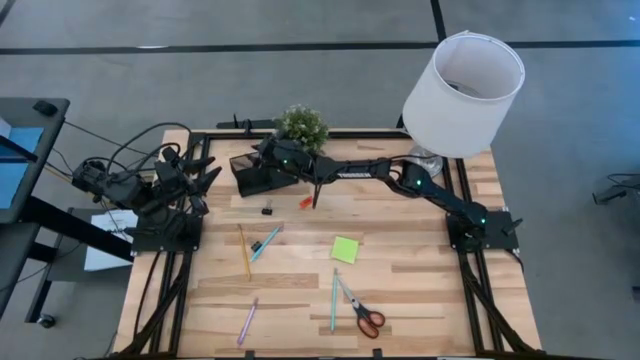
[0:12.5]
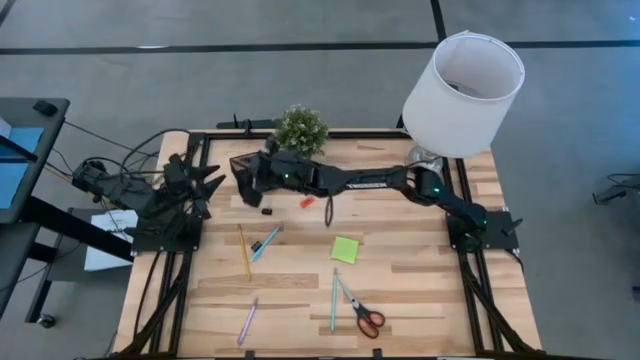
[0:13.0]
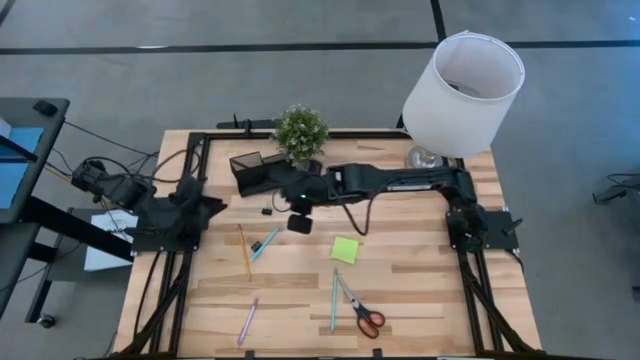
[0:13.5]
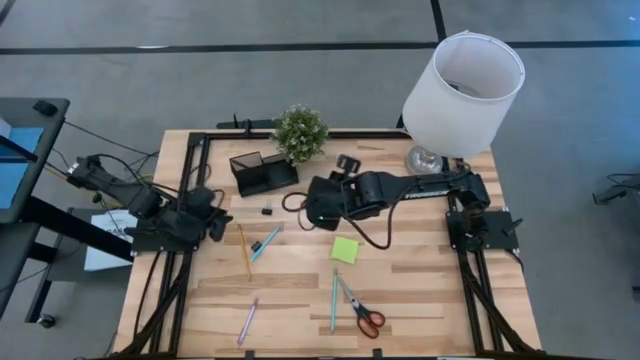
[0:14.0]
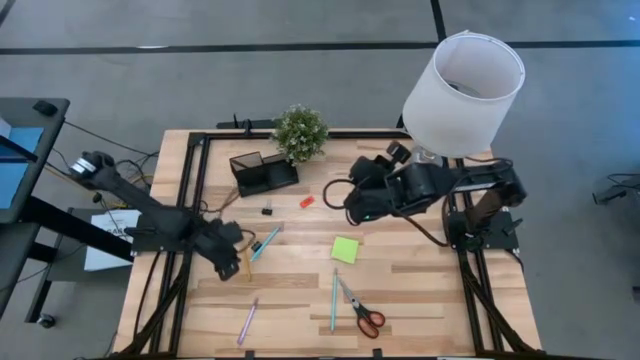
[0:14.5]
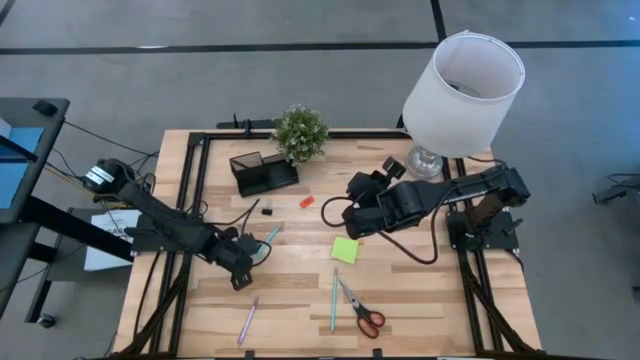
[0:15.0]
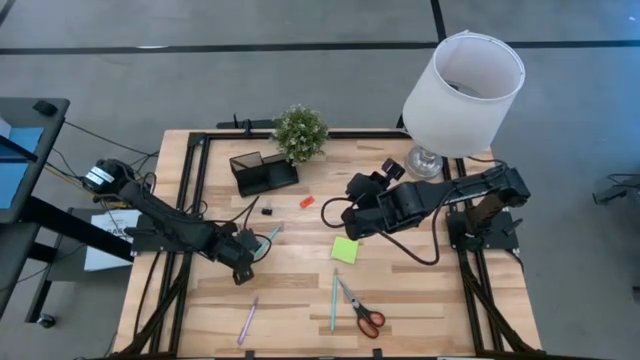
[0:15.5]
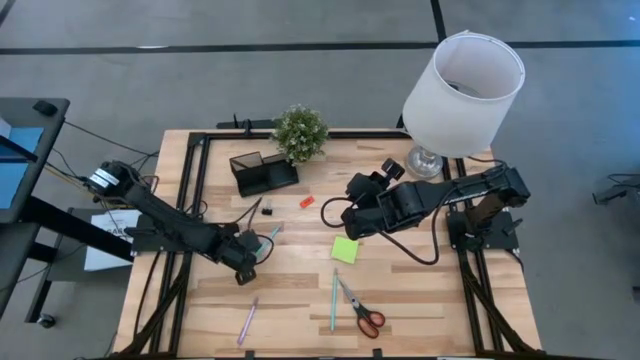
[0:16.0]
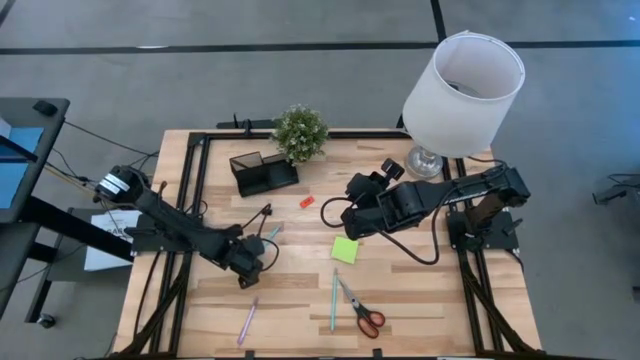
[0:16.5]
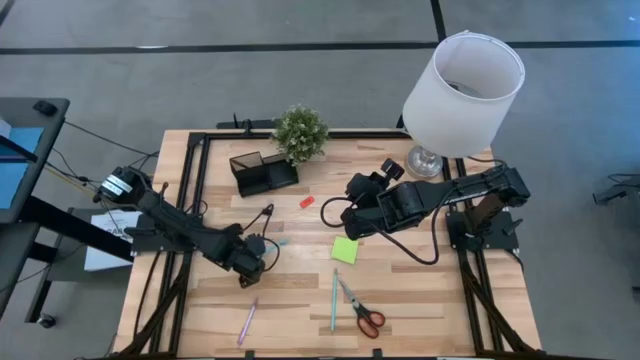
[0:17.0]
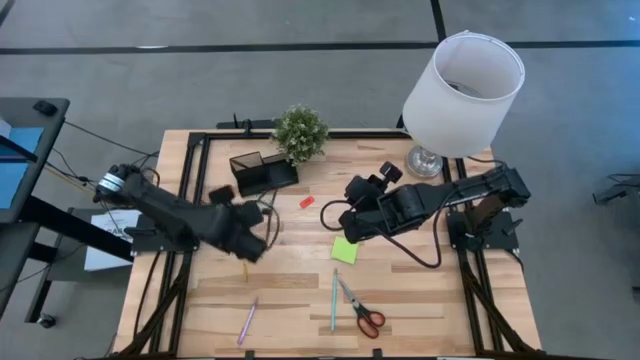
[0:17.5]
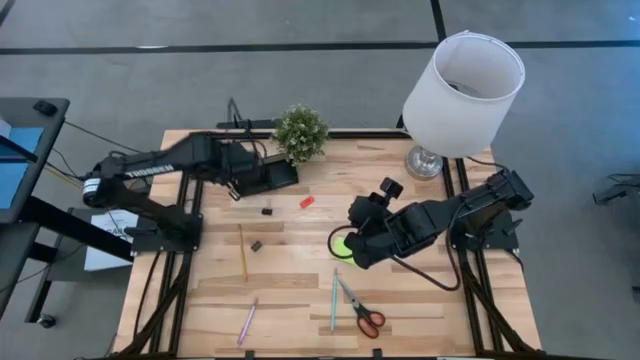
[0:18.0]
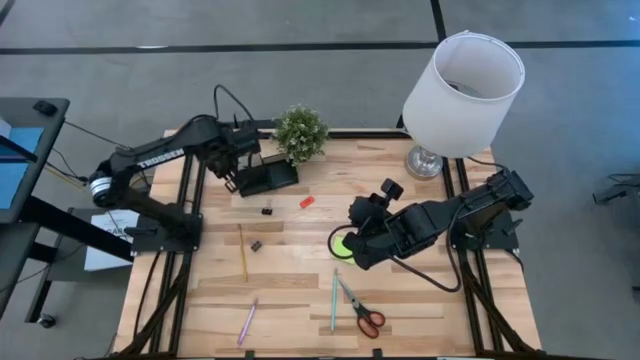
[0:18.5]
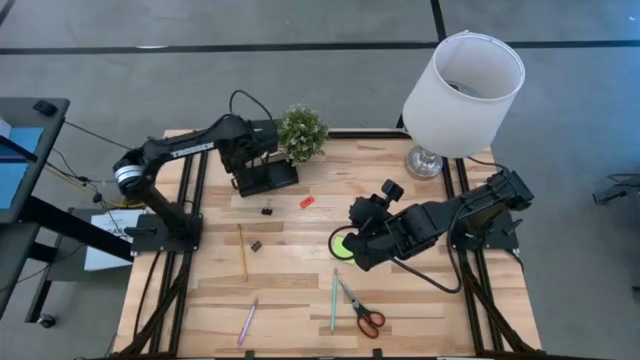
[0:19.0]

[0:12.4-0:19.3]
Task: Pick and place office supplies into organizer
Put the blue pen into the black organizer

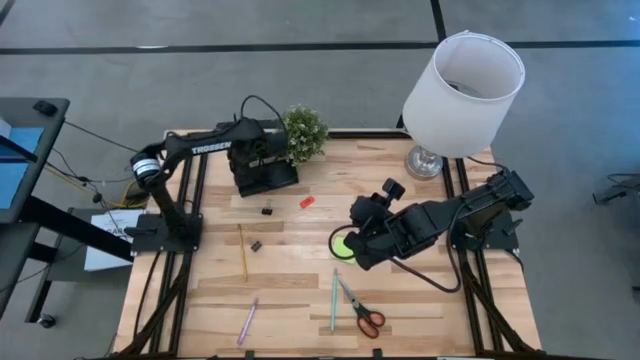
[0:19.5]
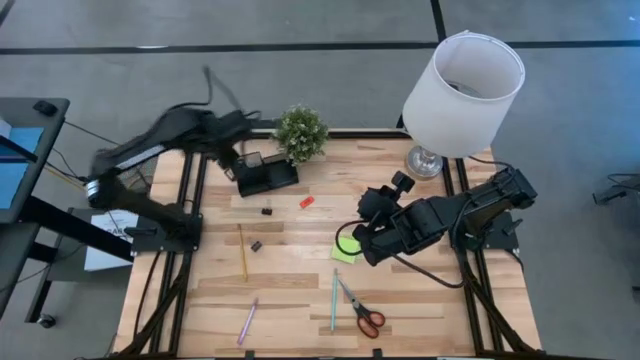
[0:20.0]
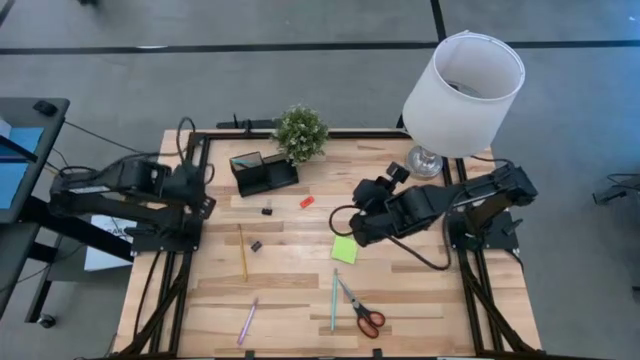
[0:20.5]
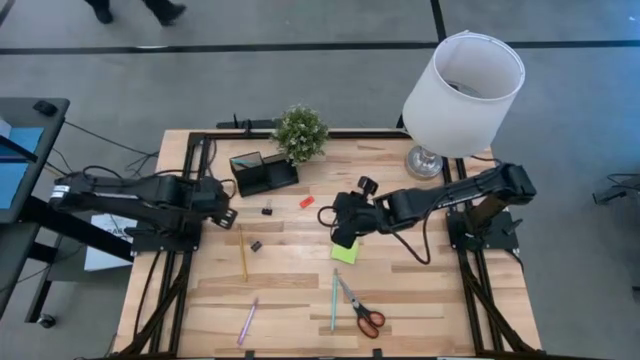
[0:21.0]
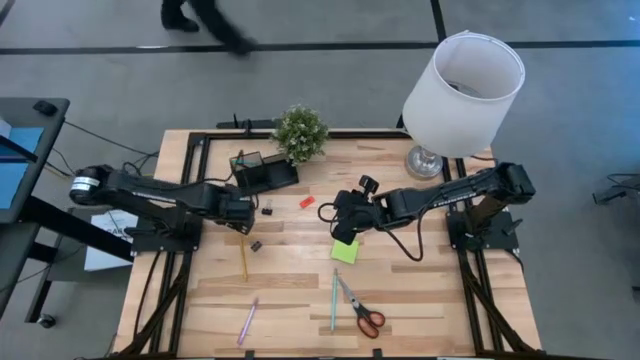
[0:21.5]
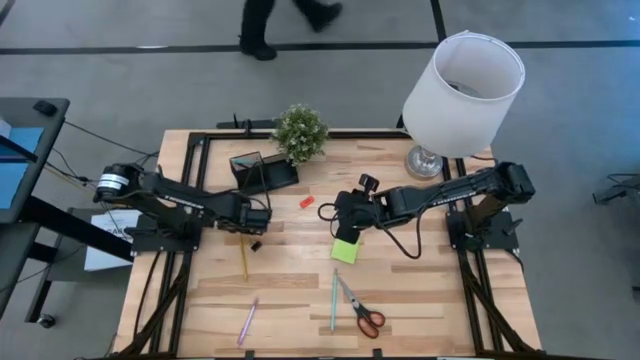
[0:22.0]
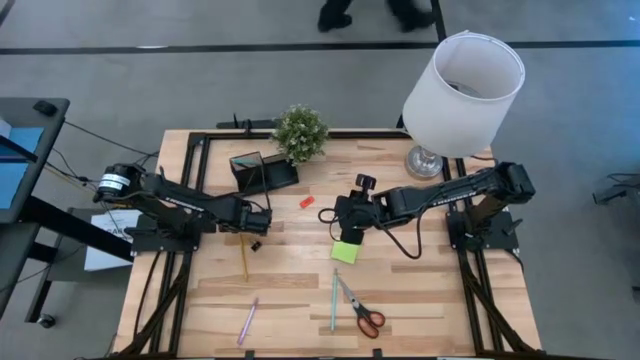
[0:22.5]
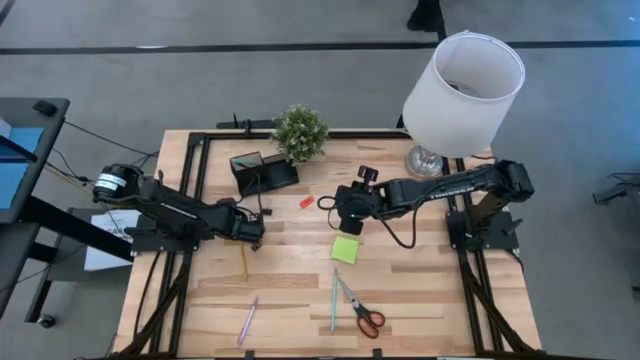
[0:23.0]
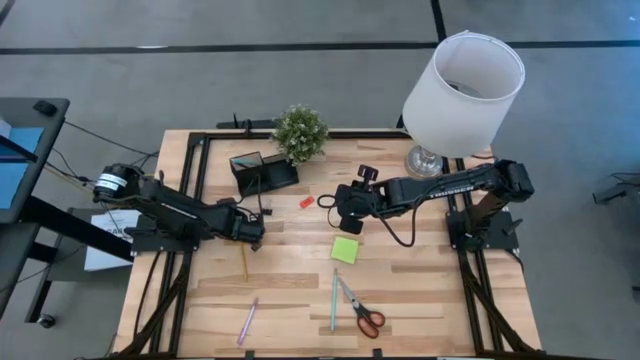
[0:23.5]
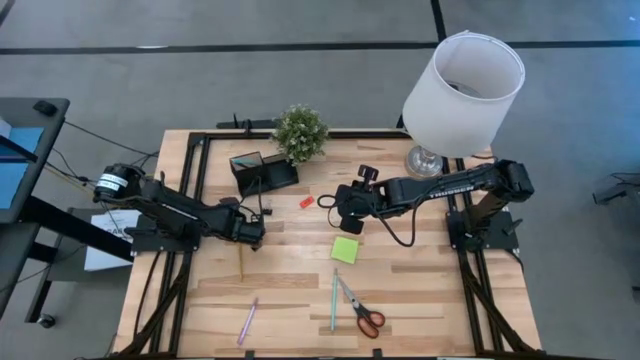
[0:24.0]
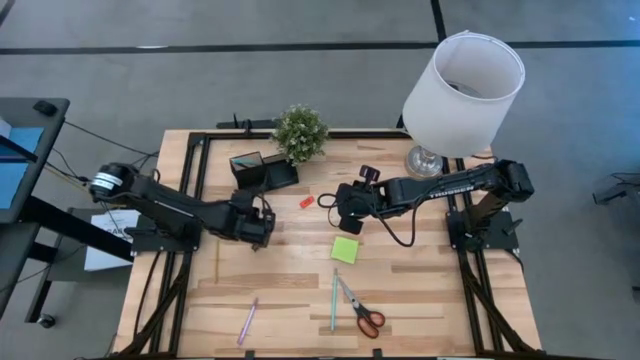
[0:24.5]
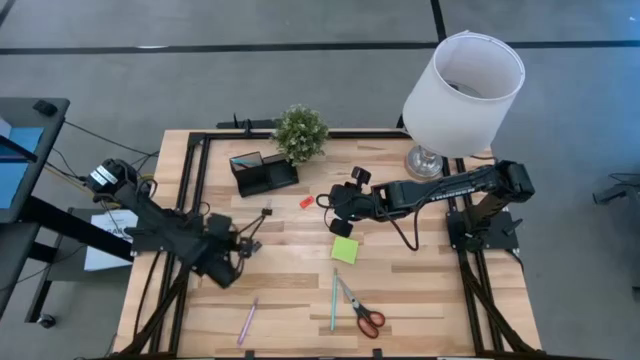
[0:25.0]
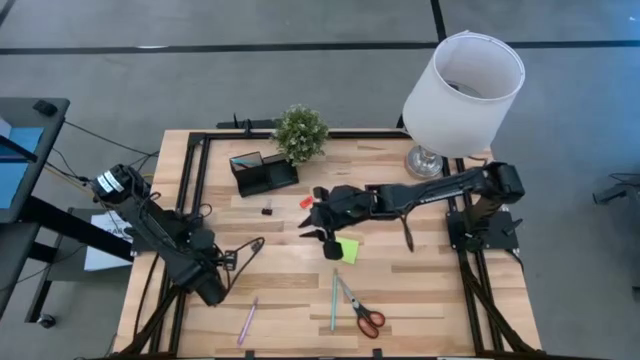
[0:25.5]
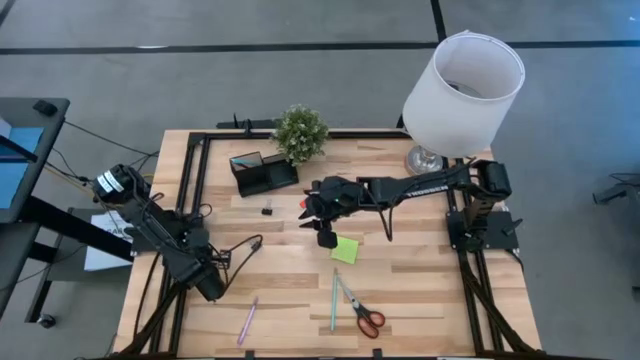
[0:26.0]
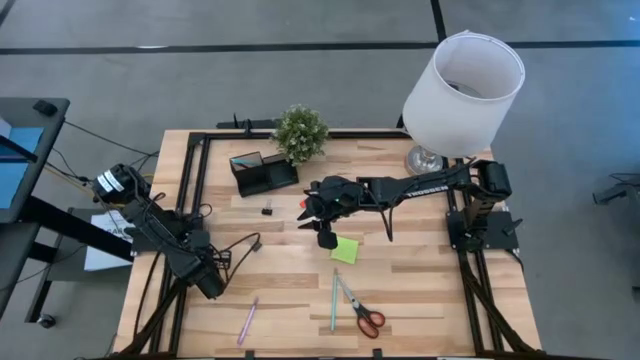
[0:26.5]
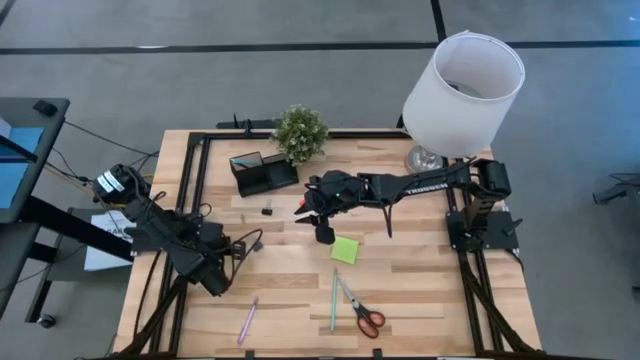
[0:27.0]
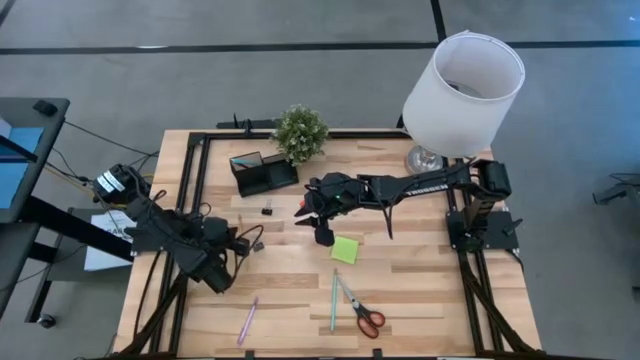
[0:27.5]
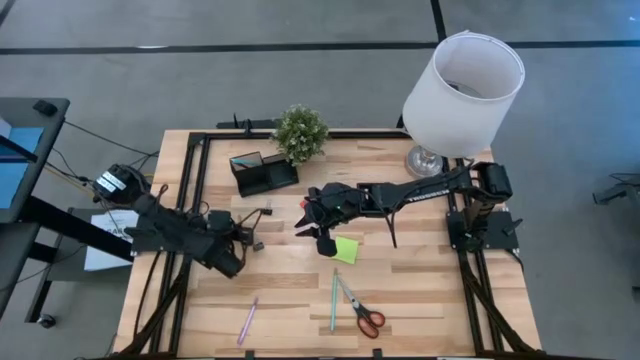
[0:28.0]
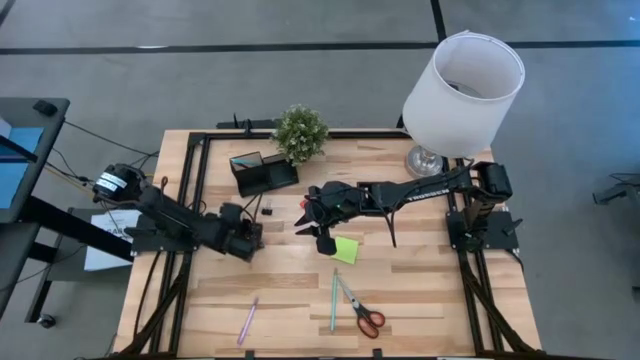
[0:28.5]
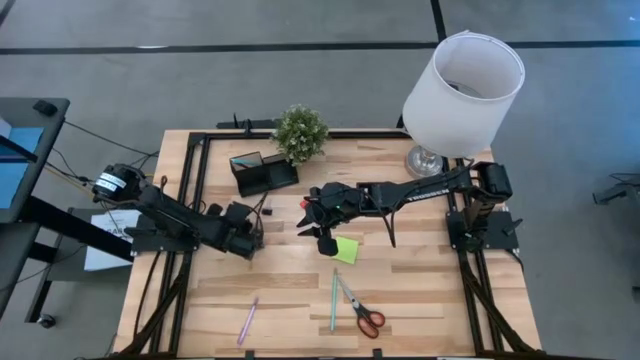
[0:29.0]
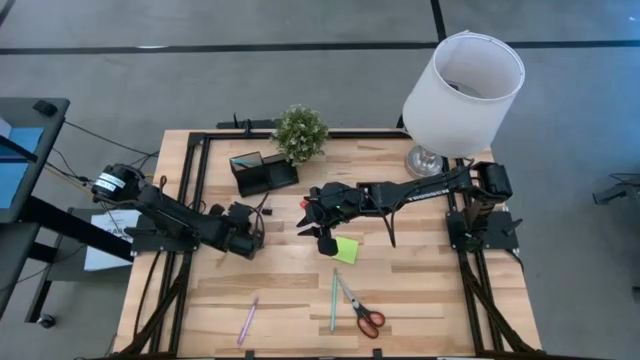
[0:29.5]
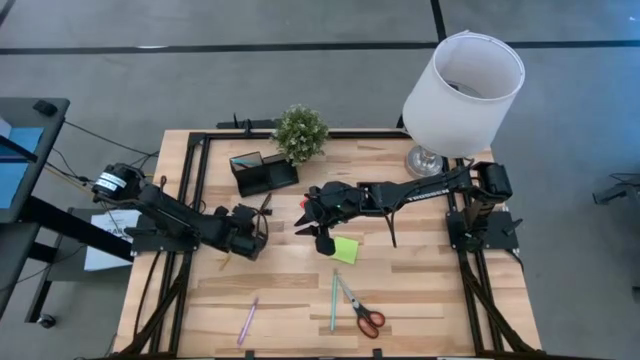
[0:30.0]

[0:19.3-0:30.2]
Put the yellow pencil into the black organizer

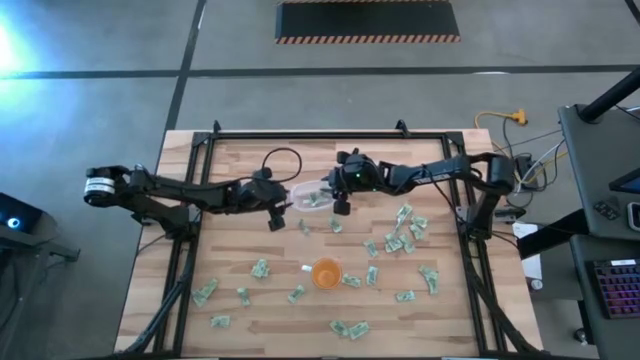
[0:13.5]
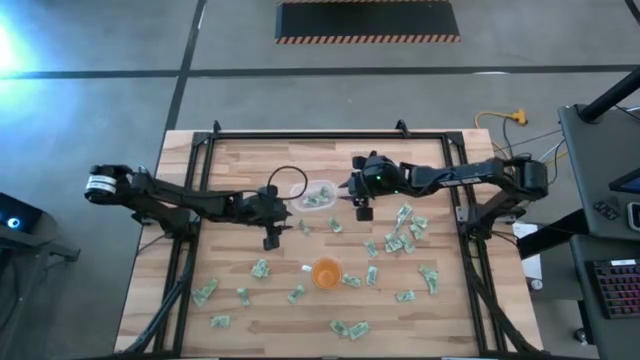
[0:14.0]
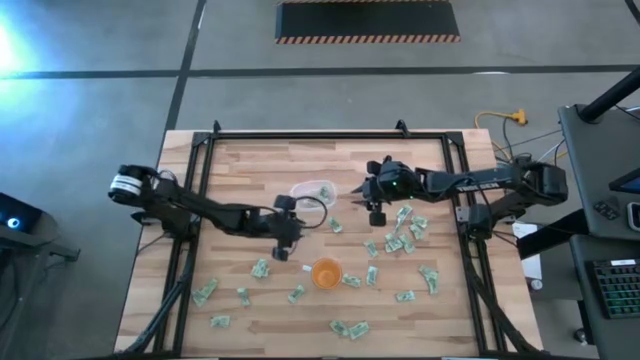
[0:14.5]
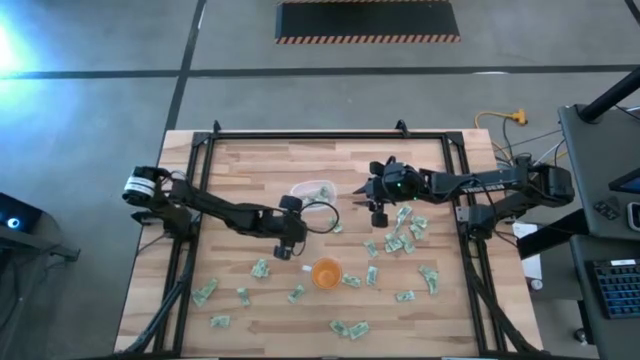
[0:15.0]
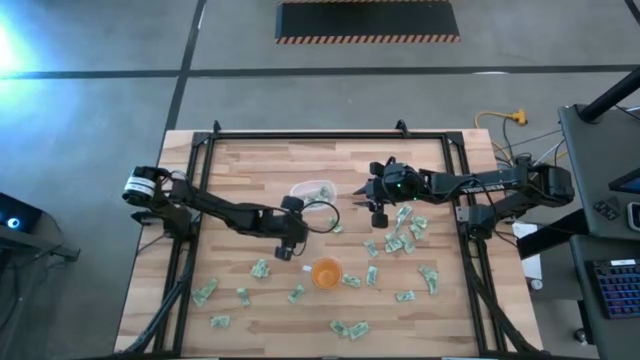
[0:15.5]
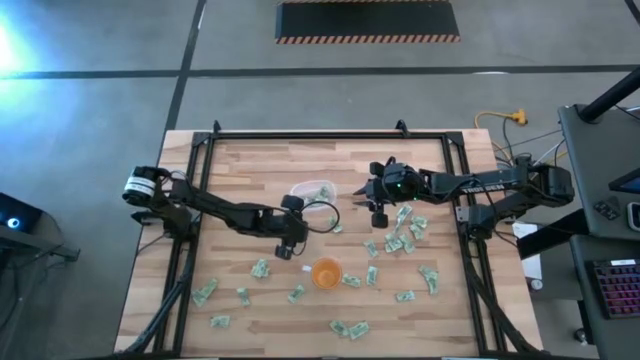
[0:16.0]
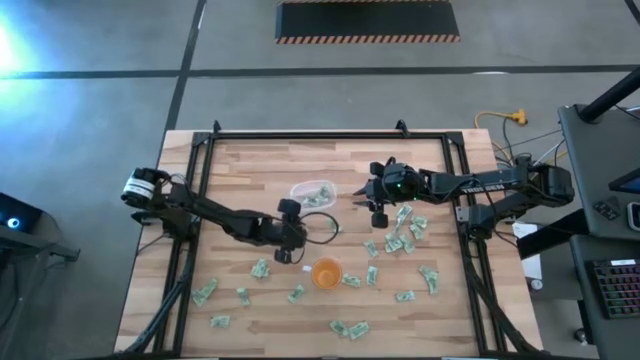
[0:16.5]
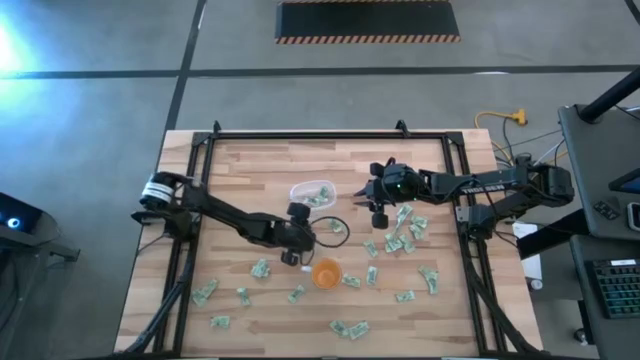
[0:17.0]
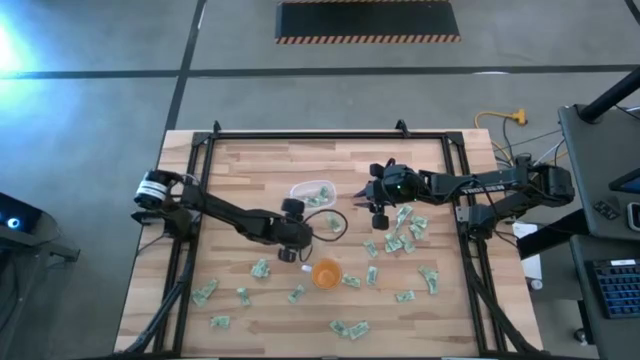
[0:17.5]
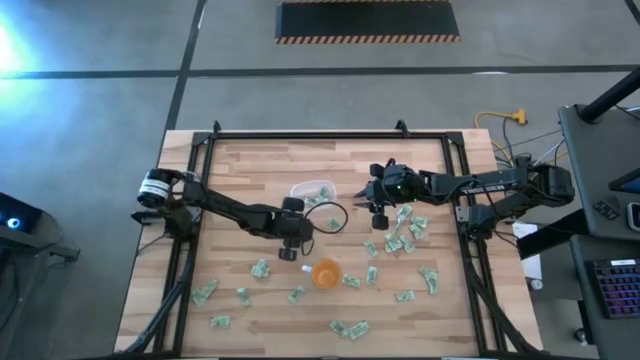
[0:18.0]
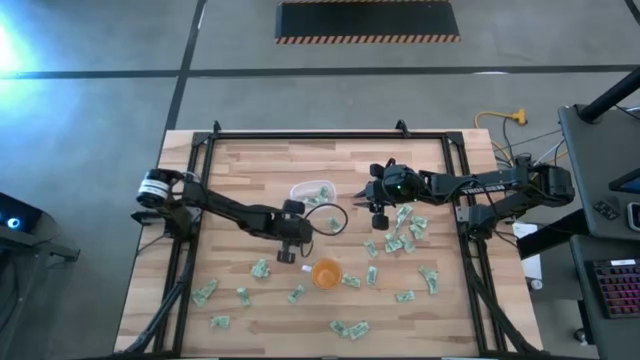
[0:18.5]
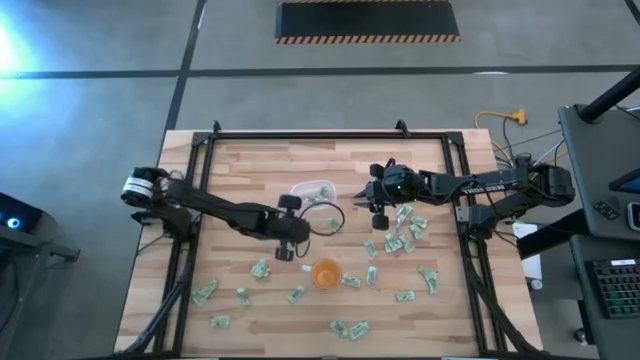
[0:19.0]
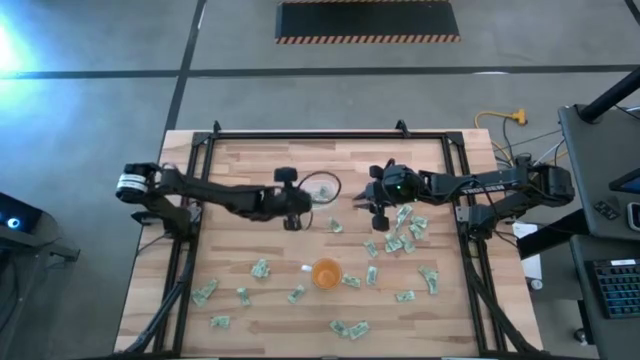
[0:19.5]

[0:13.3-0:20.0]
Task: Pick and place Stevia / Truvia into bins
Put the stevia packet into the transparent bin
